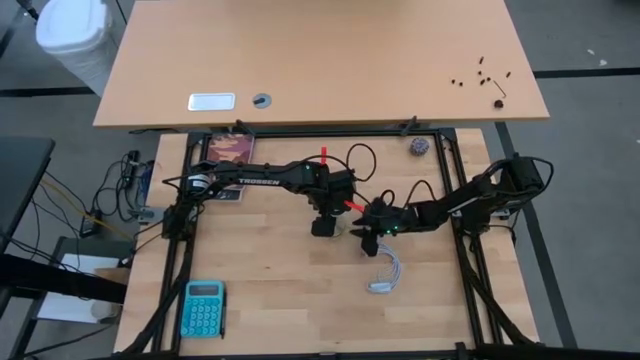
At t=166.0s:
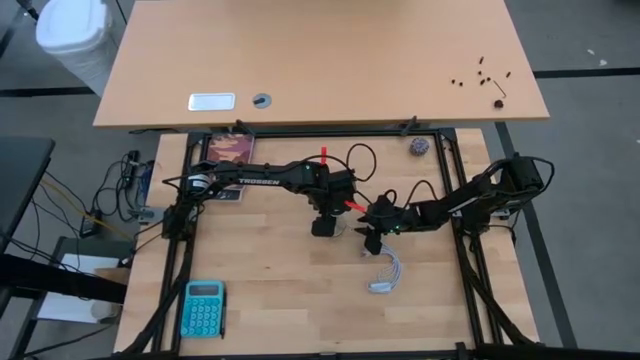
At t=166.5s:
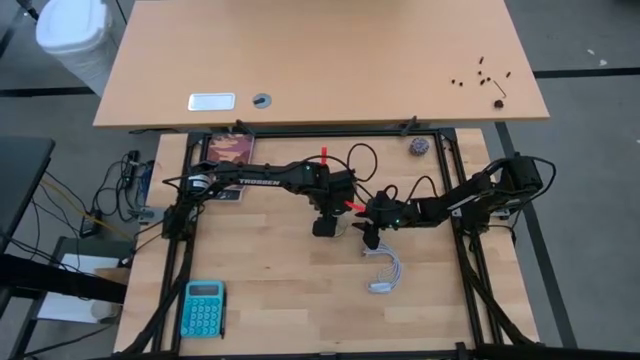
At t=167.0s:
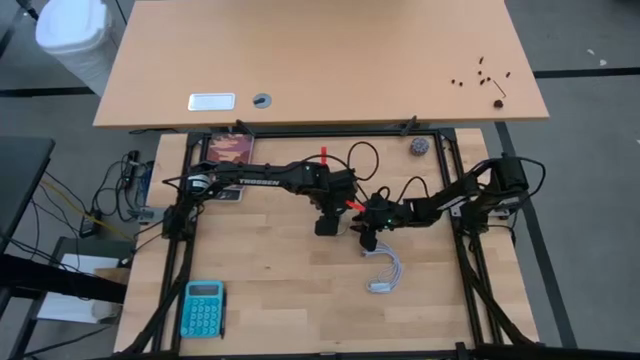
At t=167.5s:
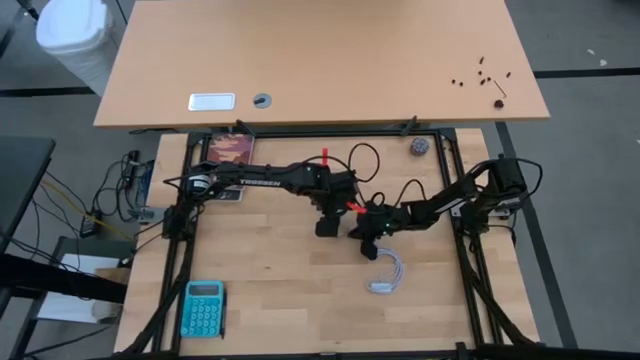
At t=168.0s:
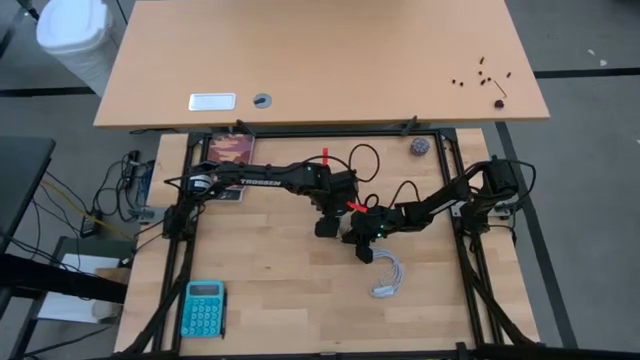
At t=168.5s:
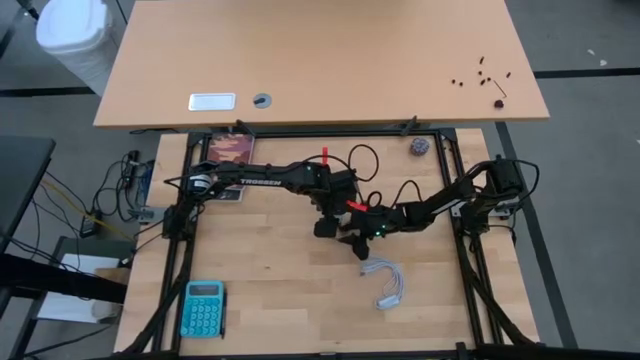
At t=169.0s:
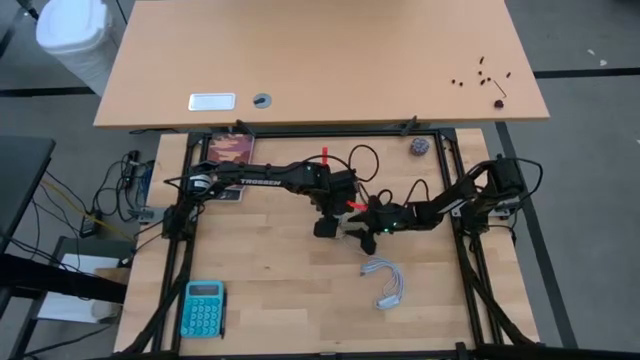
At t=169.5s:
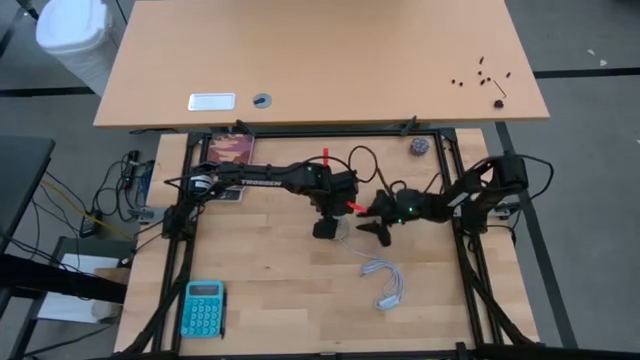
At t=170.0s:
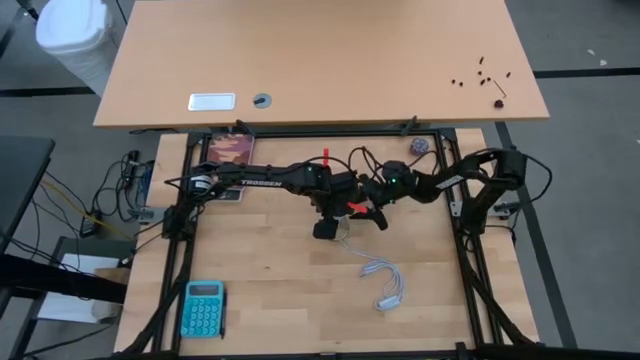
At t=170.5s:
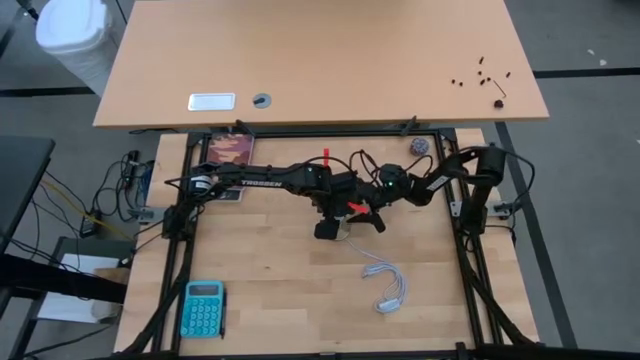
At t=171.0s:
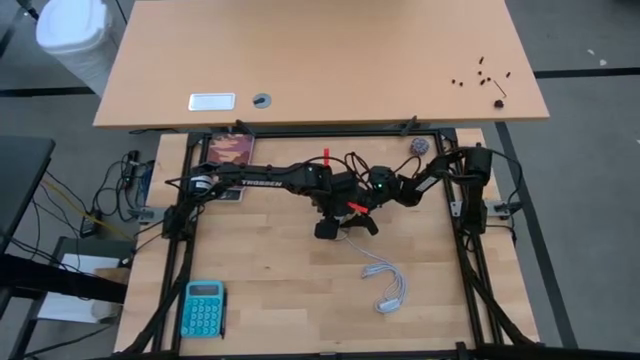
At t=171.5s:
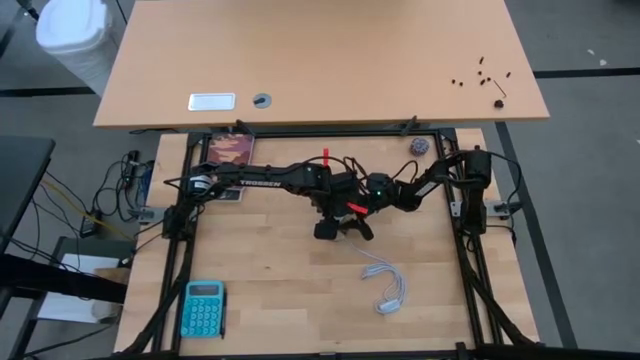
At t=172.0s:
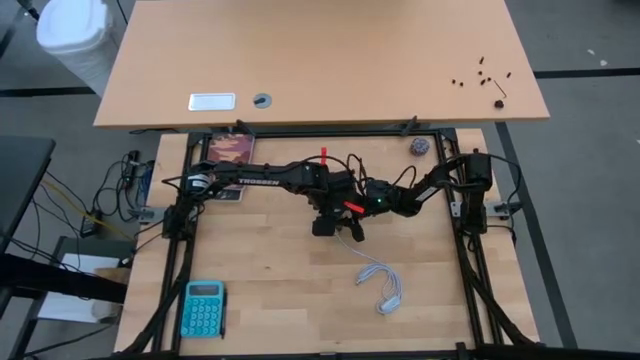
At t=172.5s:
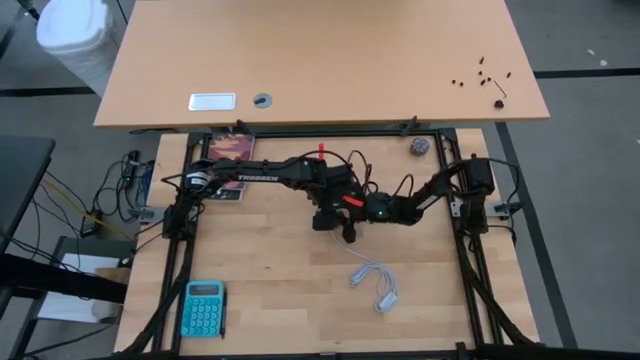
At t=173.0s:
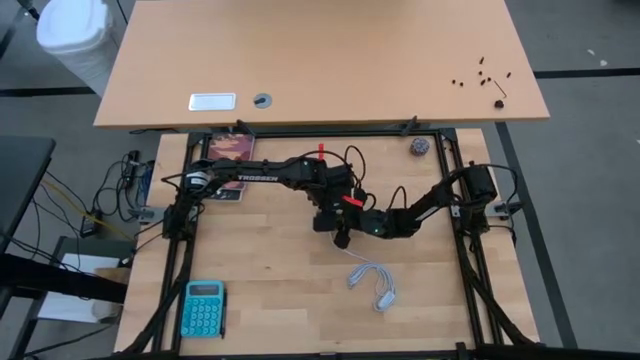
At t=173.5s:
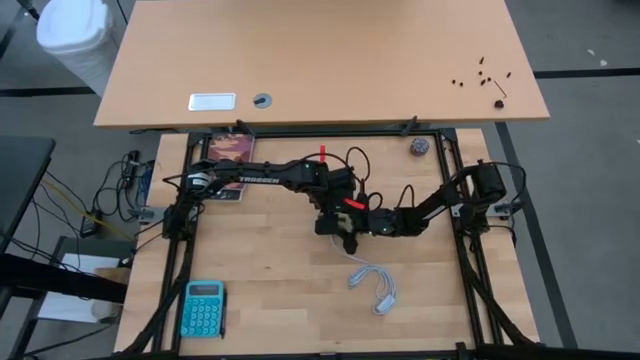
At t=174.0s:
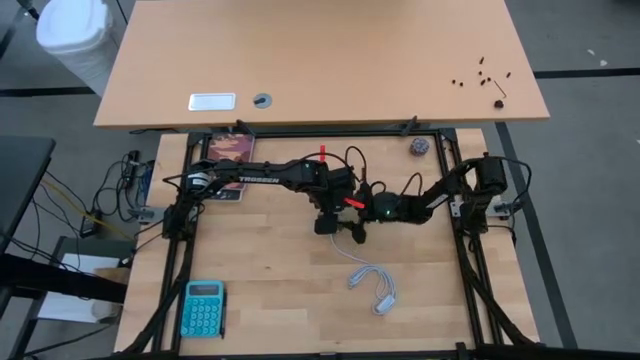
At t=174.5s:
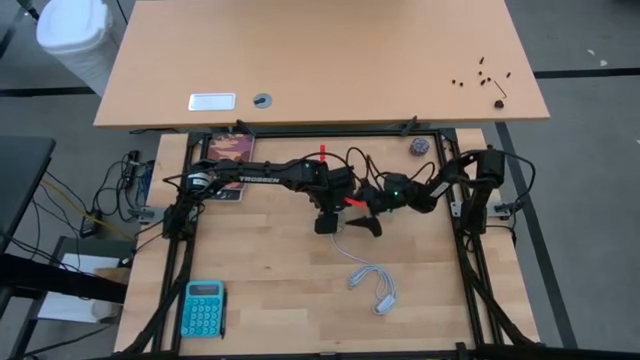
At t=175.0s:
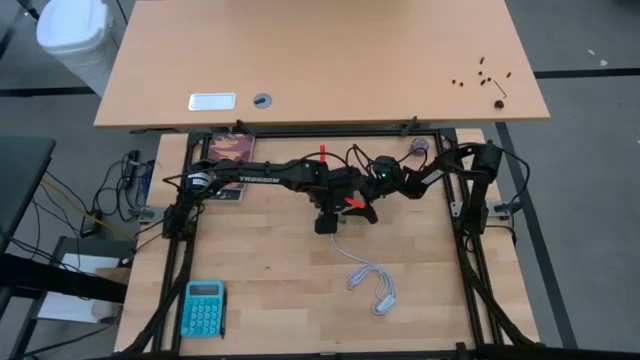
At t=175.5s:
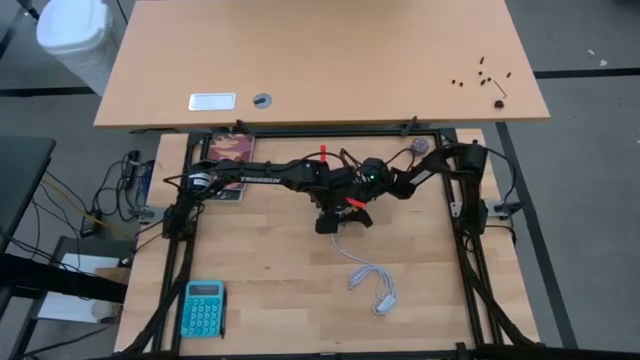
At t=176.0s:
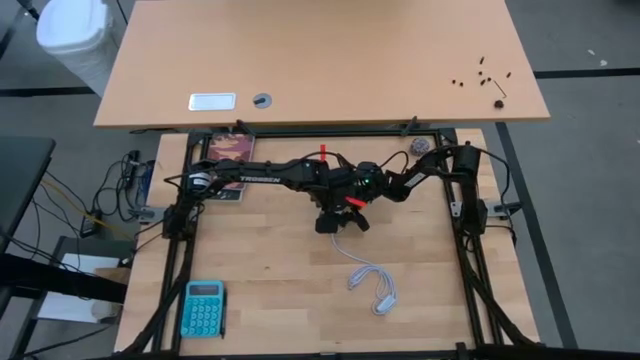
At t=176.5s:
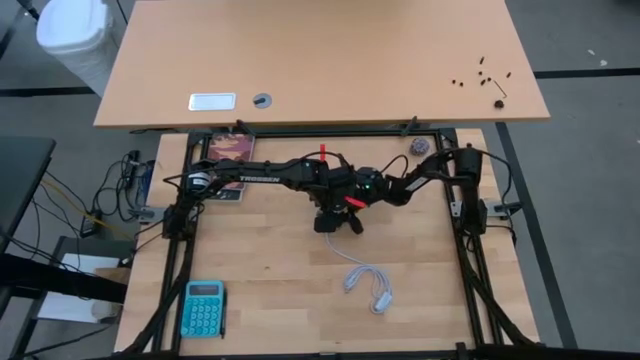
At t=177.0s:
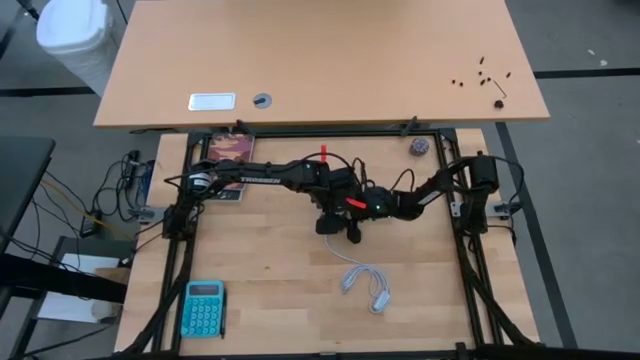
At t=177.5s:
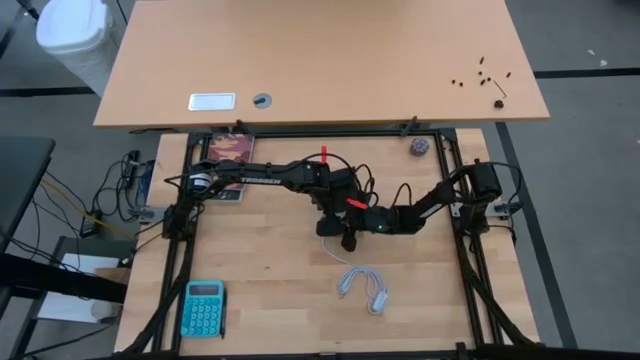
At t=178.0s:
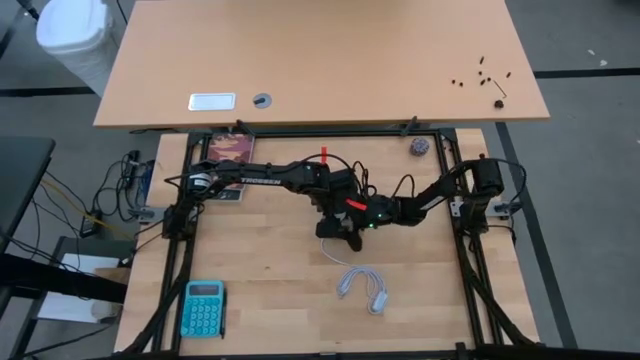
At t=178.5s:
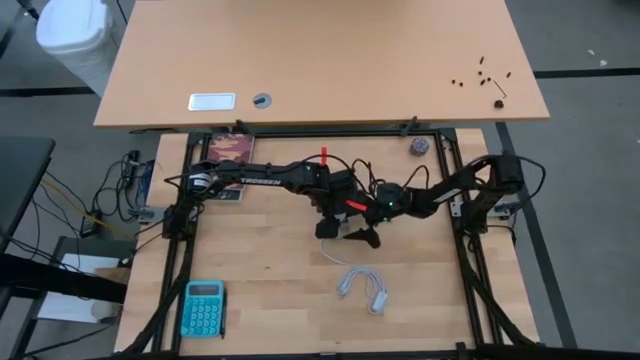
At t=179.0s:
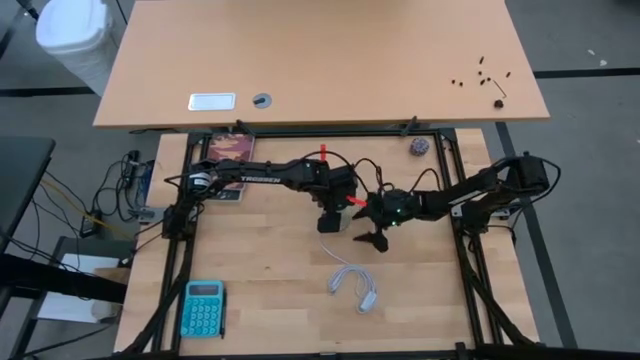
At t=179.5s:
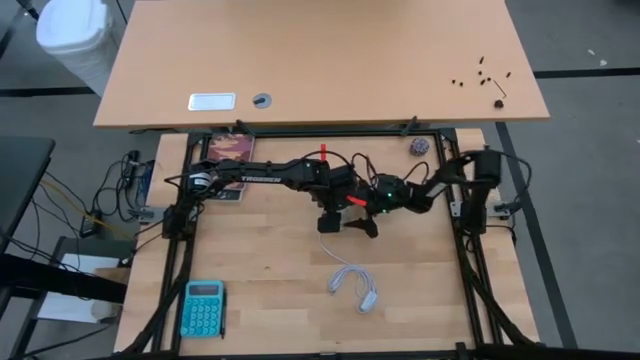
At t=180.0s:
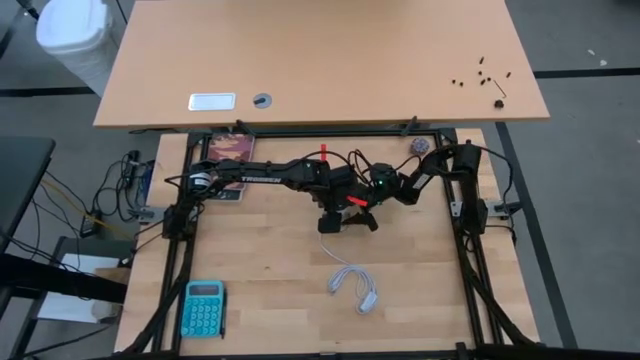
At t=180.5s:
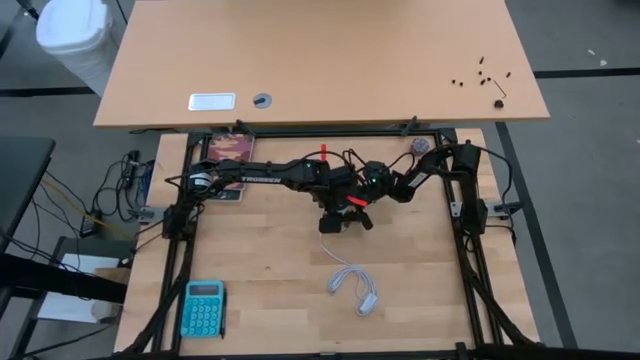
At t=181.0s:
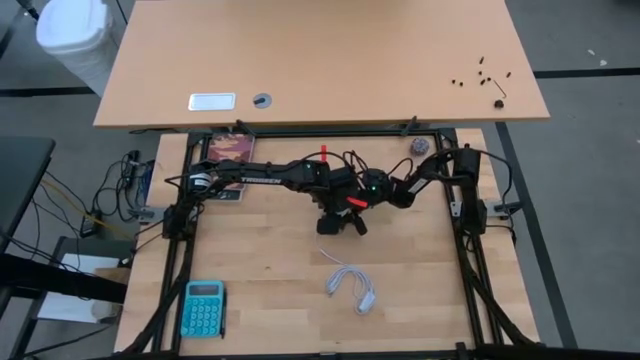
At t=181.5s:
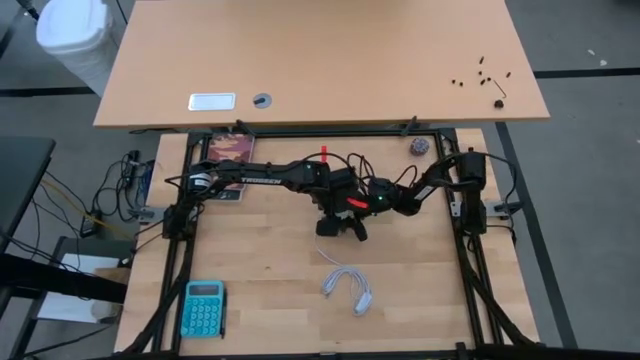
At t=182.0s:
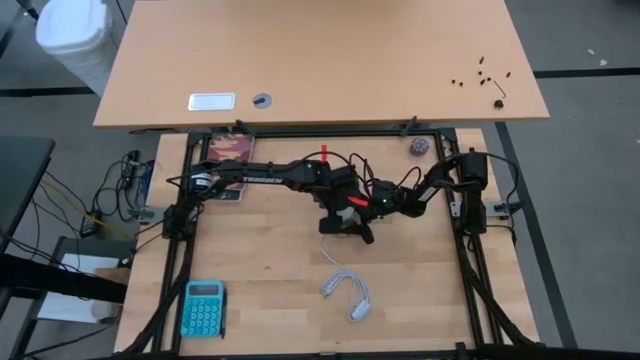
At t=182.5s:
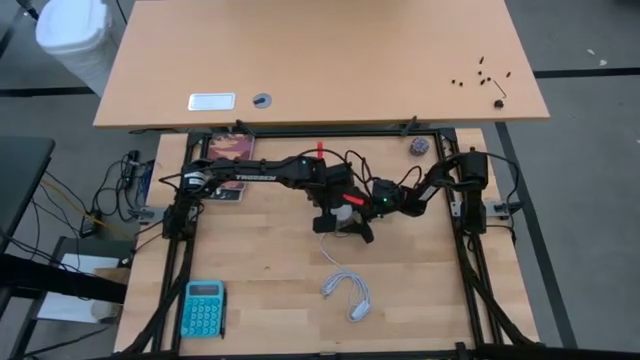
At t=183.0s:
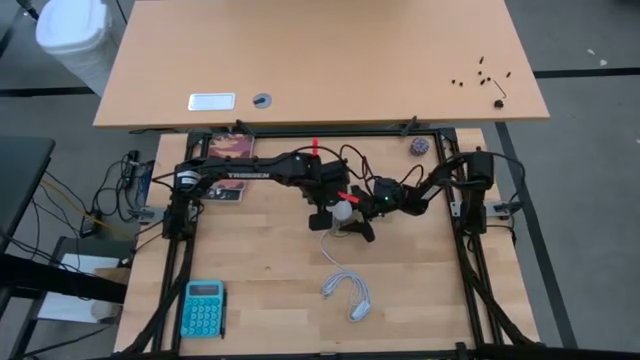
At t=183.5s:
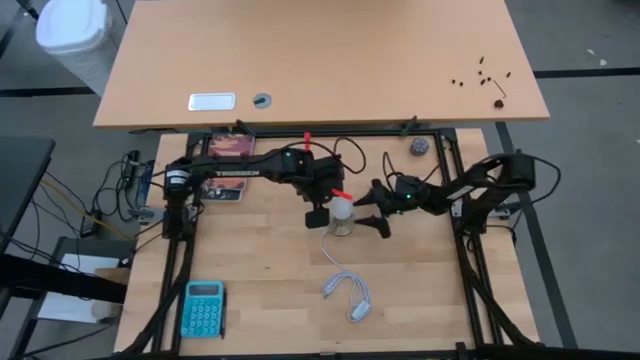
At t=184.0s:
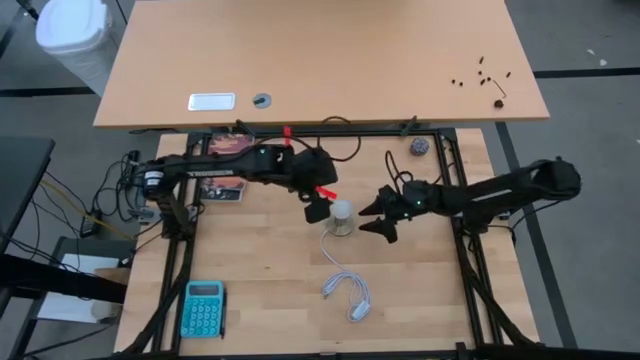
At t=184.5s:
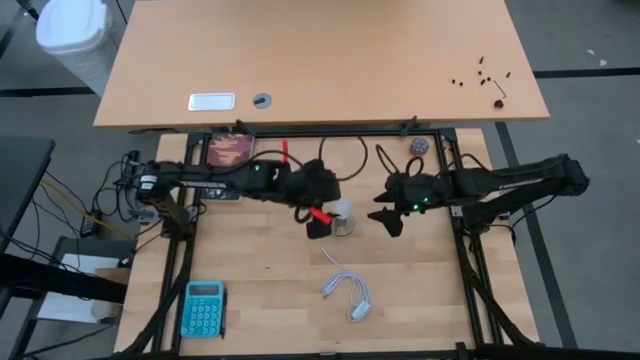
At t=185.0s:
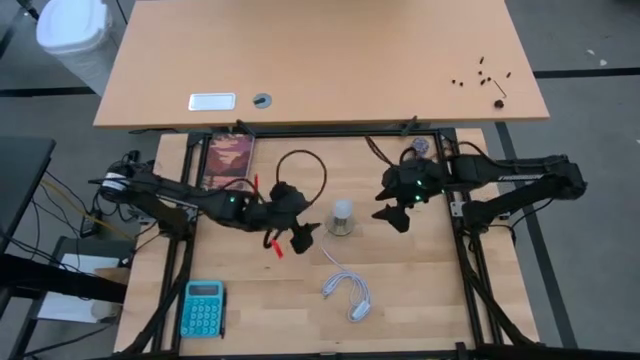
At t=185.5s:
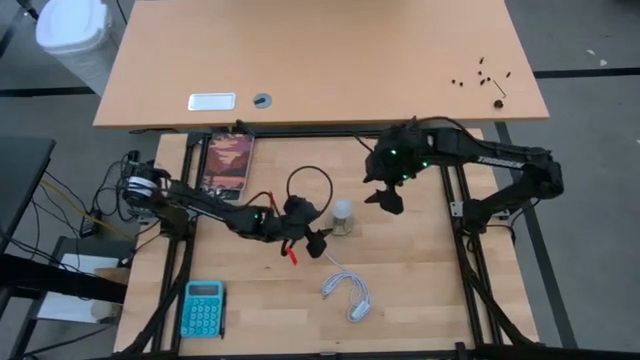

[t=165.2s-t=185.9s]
Task: Screw lightbulb
Insert the lightbulb into the desk lamp
